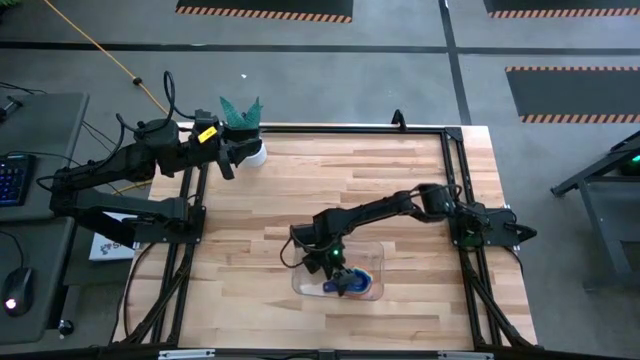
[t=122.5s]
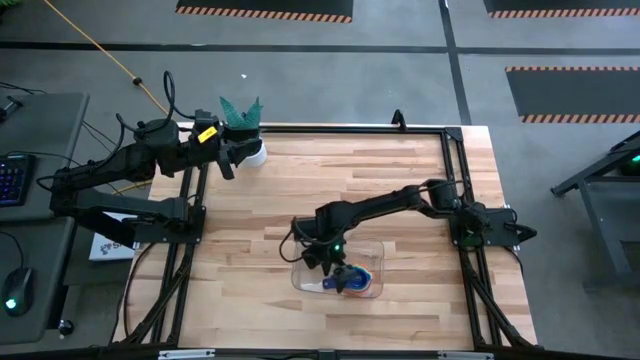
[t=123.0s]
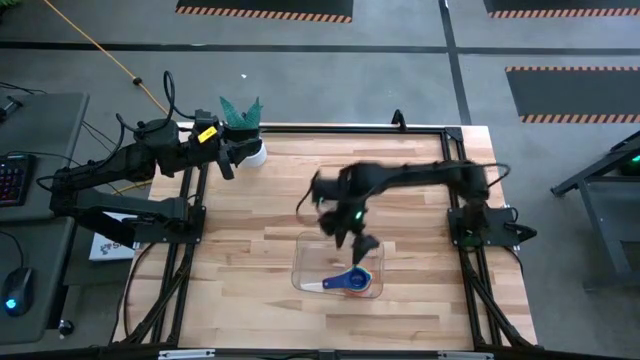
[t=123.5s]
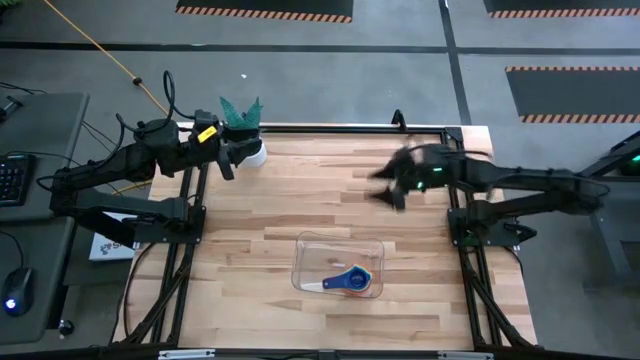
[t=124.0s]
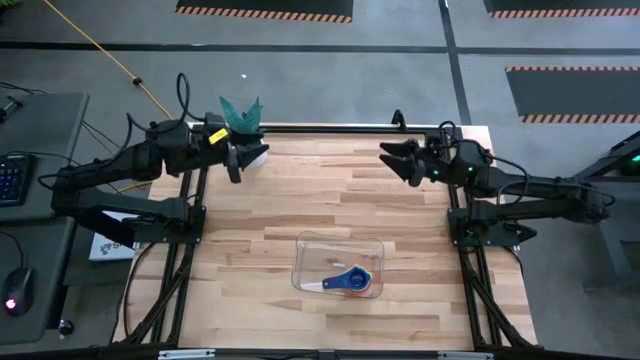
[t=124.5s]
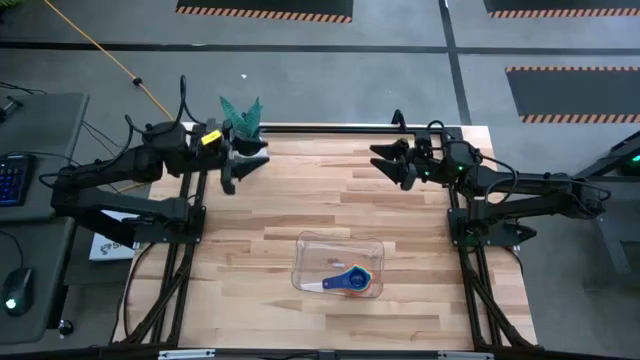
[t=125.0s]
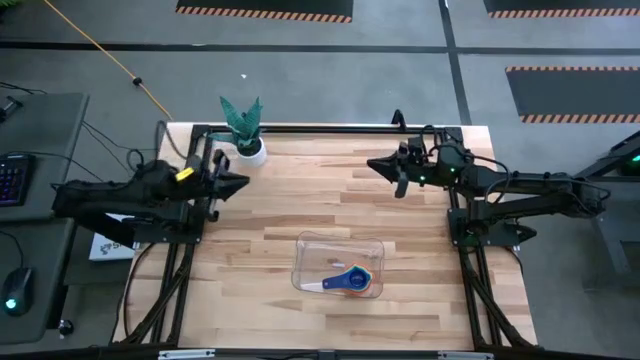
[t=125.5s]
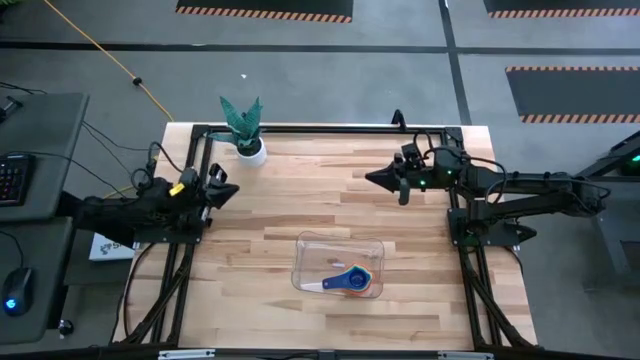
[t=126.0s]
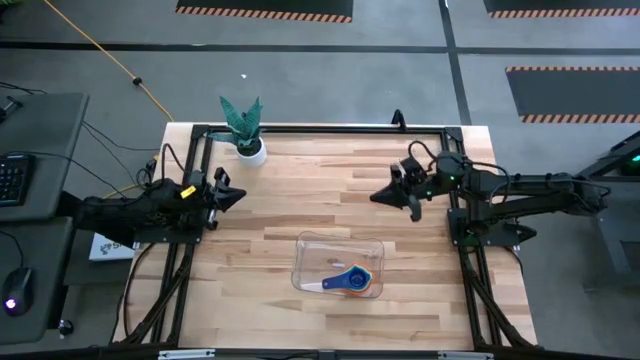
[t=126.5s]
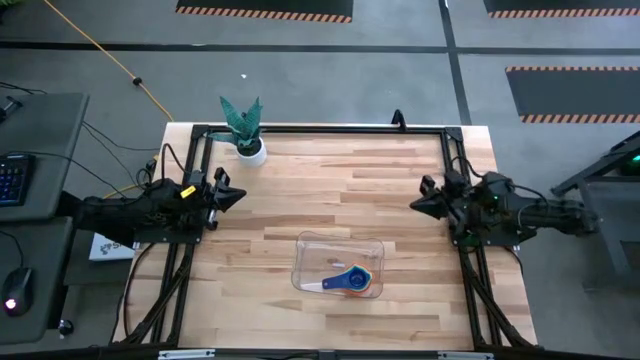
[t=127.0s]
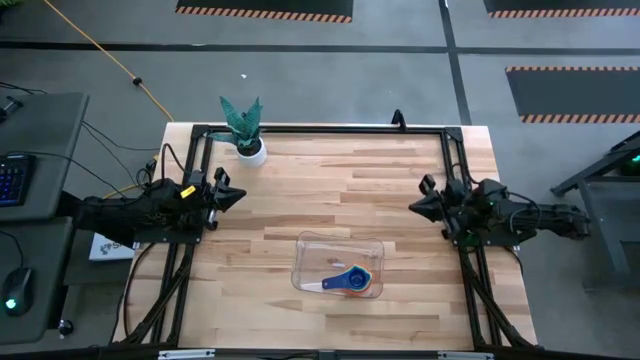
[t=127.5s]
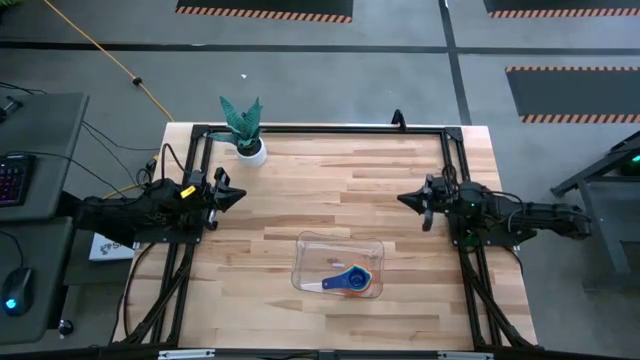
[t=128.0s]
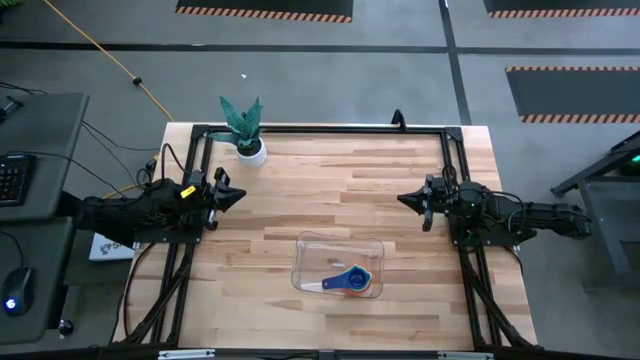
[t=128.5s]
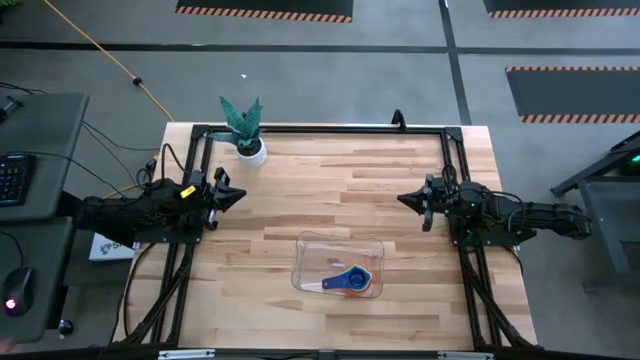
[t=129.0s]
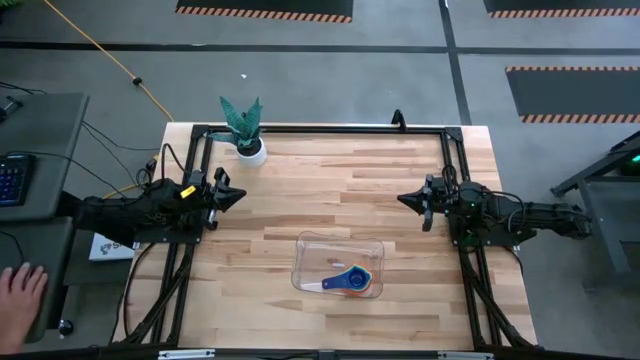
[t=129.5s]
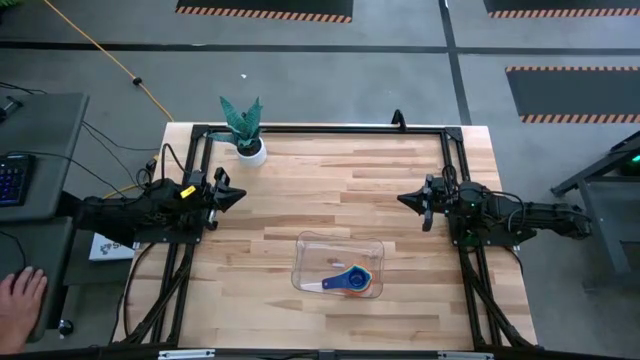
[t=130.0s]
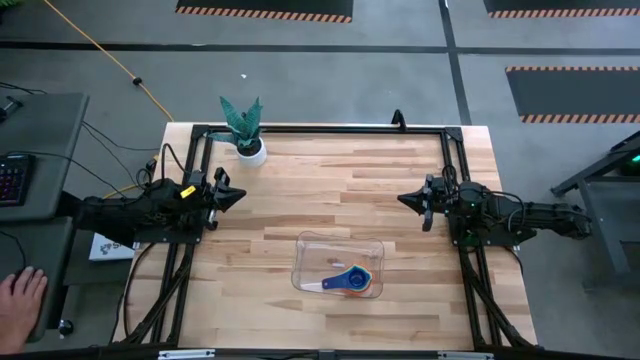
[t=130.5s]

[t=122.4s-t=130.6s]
Task: Nest measuring cups in basket
Return to Home Position

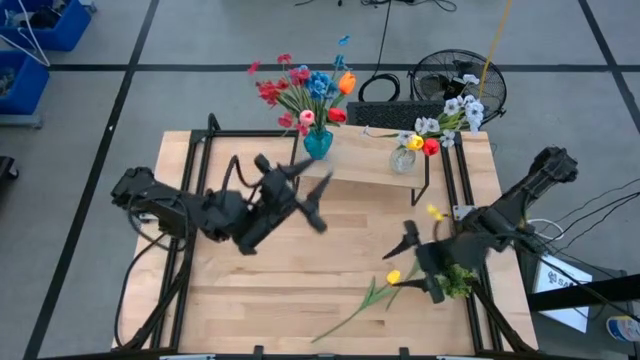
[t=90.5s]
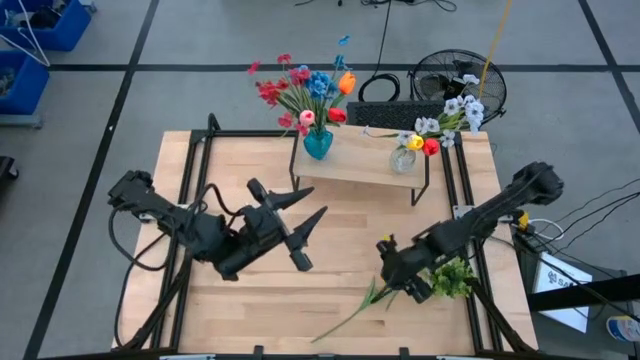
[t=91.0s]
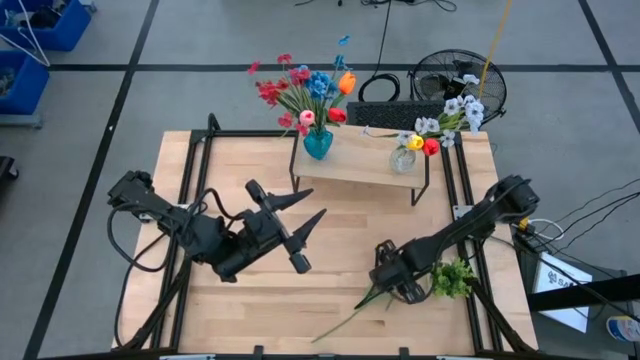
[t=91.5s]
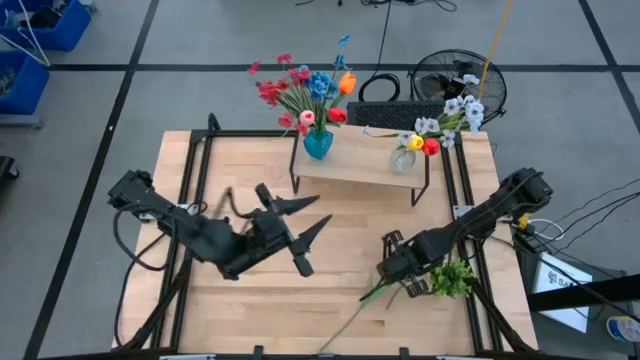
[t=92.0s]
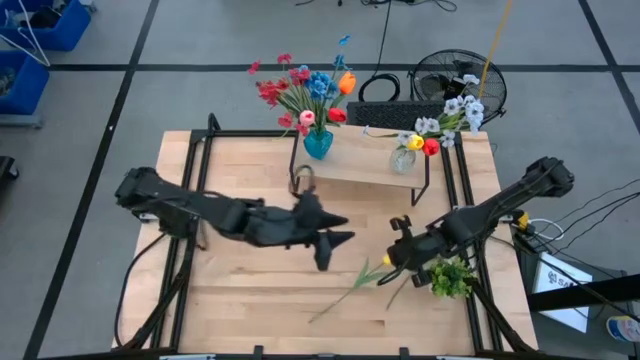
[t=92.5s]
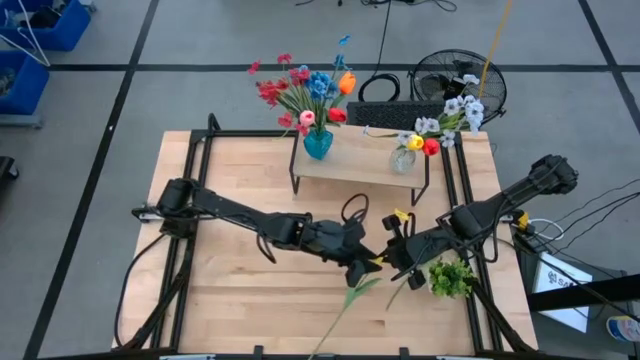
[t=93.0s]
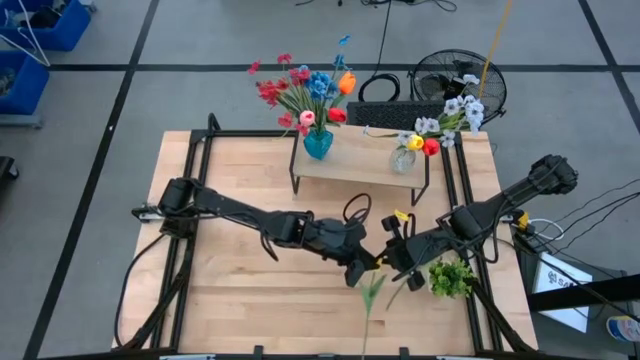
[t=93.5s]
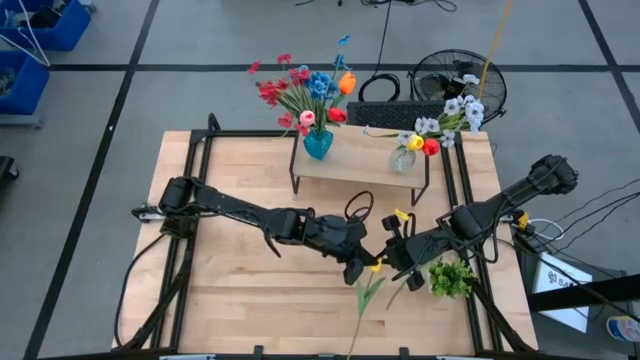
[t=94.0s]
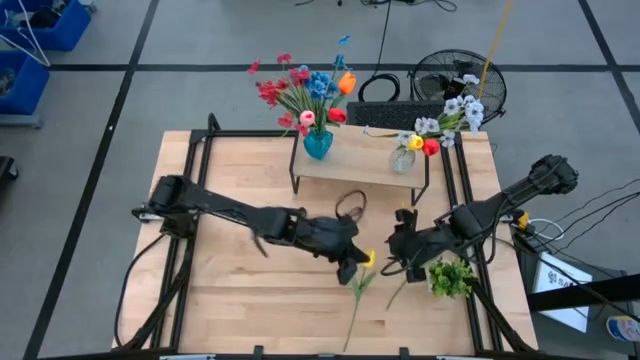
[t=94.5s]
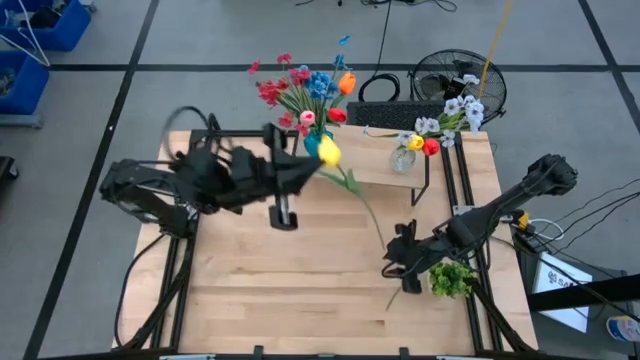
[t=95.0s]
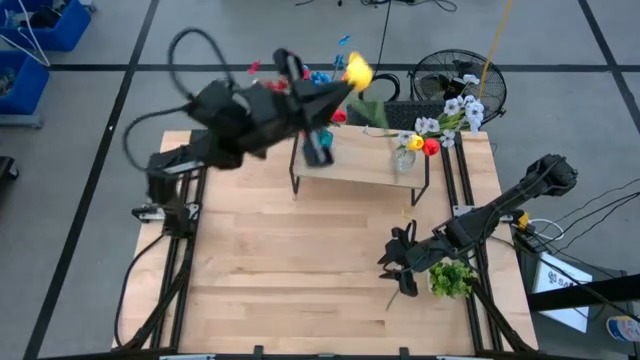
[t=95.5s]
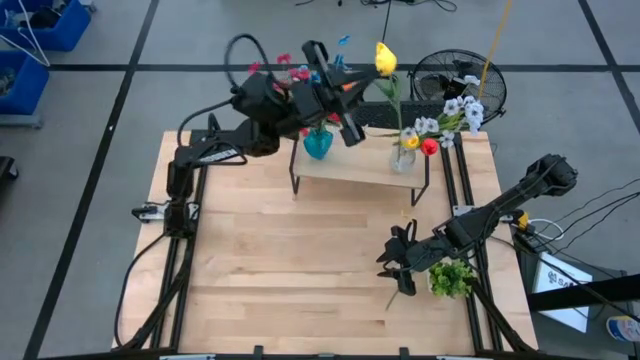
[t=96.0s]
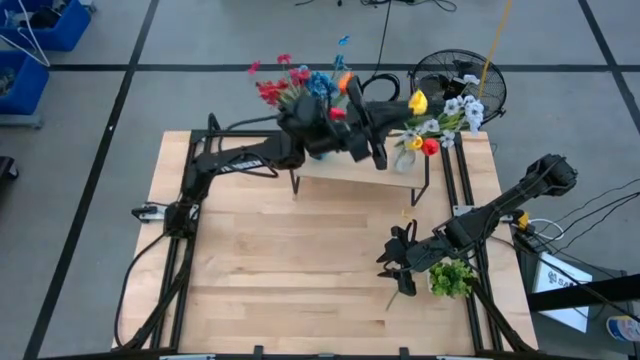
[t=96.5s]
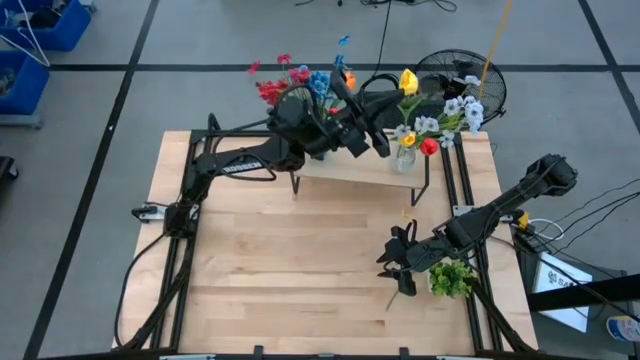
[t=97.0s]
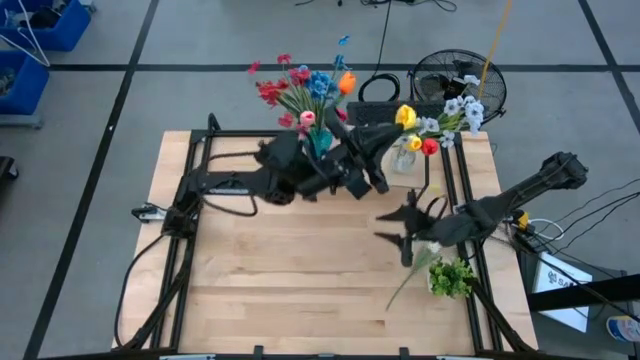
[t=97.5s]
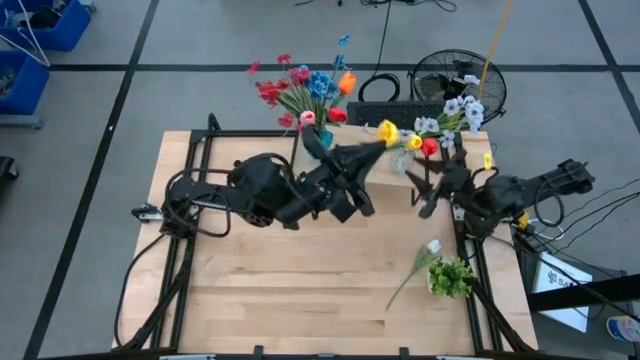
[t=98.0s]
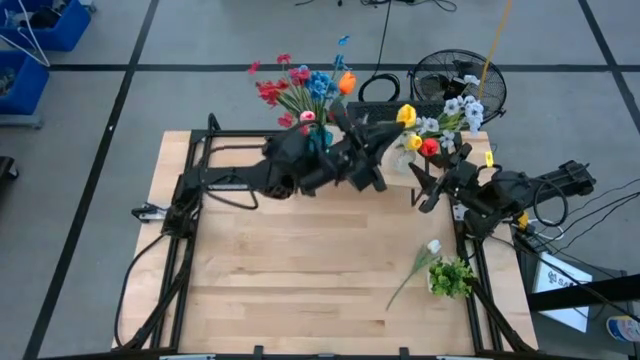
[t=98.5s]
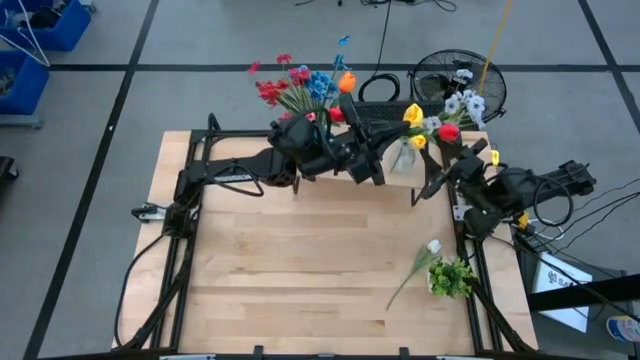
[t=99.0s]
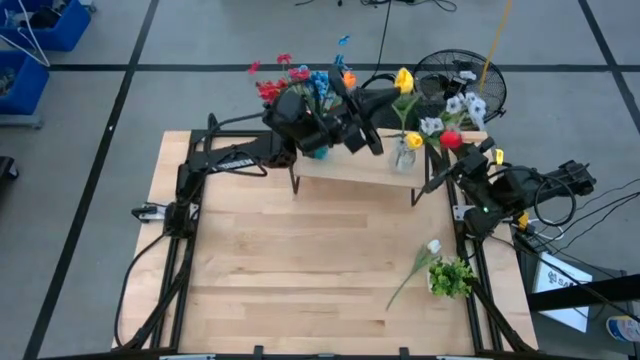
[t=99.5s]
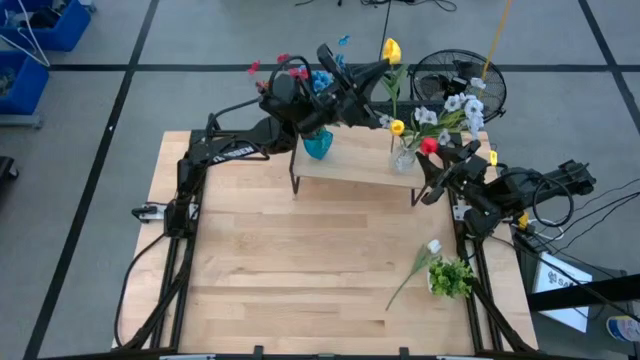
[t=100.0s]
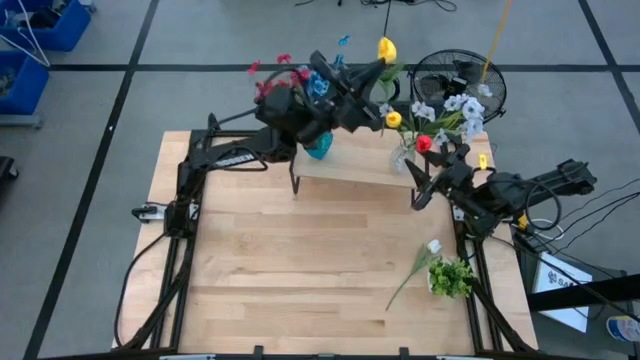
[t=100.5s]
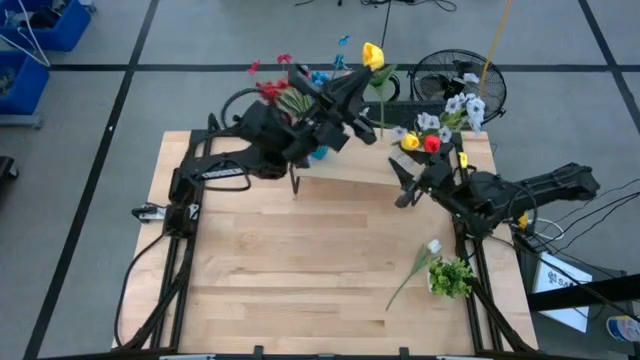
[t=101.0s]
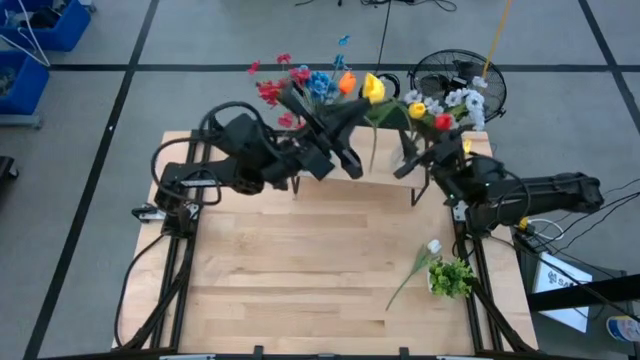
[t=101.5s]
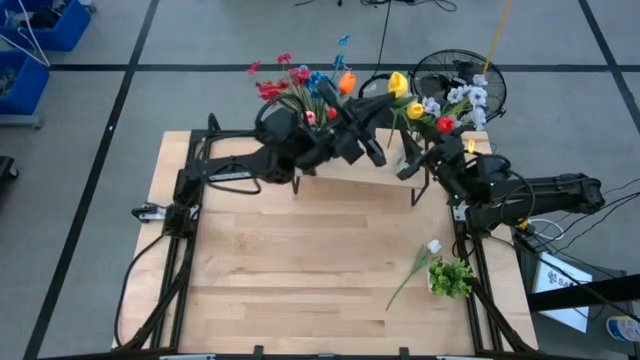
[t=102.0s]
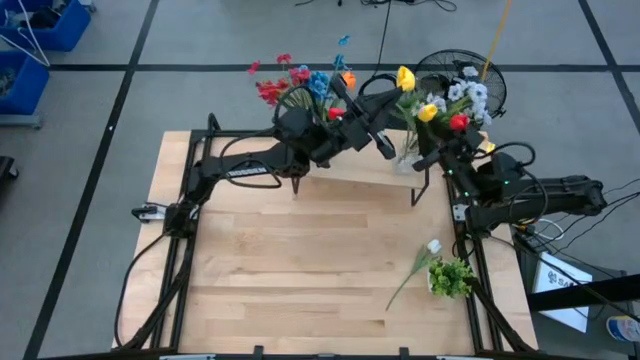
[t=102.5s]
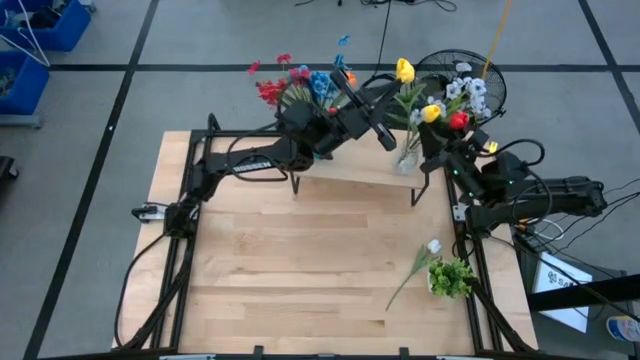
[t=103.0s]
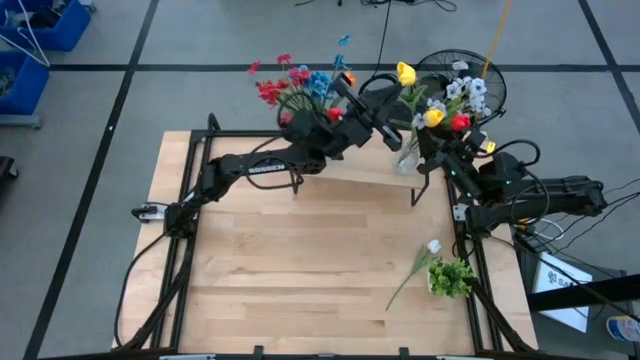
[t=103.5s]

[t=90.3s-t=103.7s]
Task: Pick and place flowers into a vace then onto a shelf
Put the yellow tulip into the transparent vase
